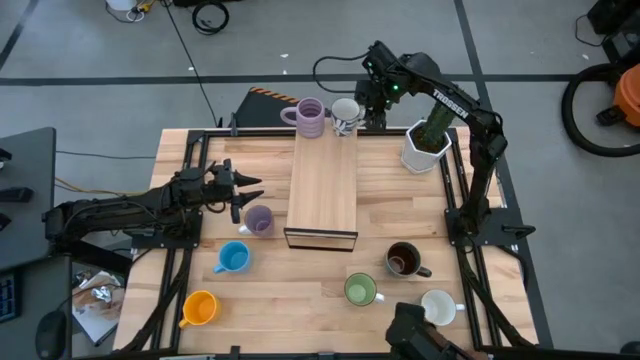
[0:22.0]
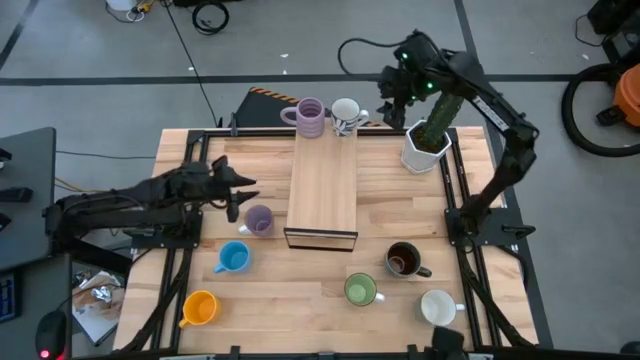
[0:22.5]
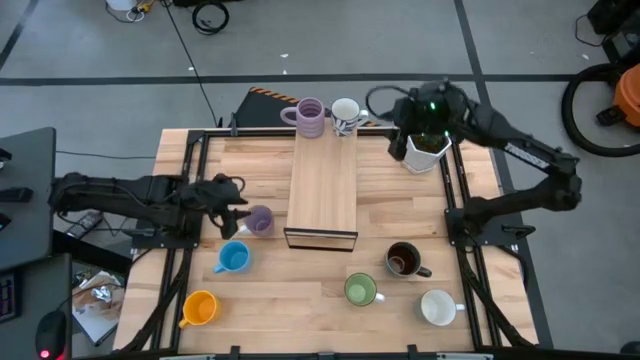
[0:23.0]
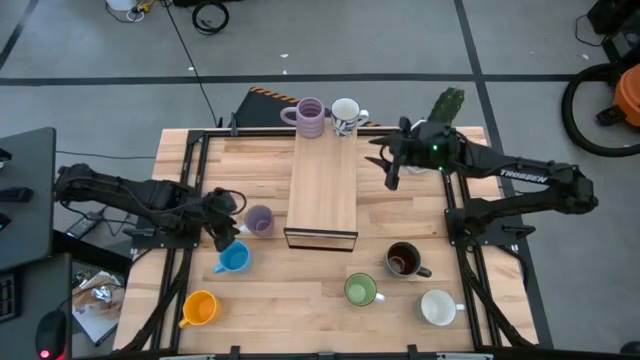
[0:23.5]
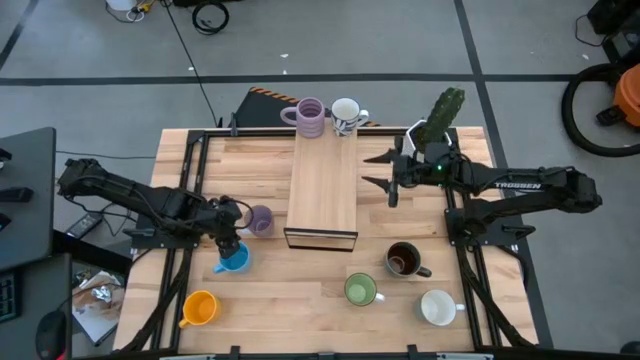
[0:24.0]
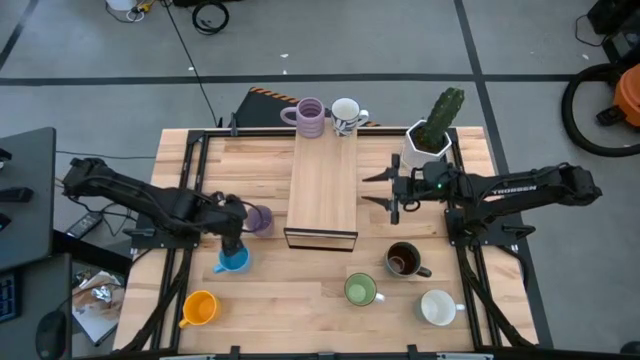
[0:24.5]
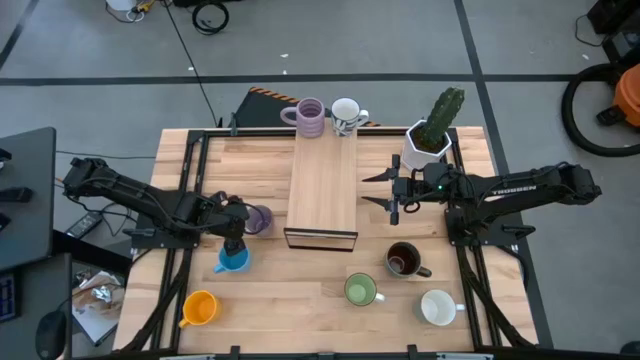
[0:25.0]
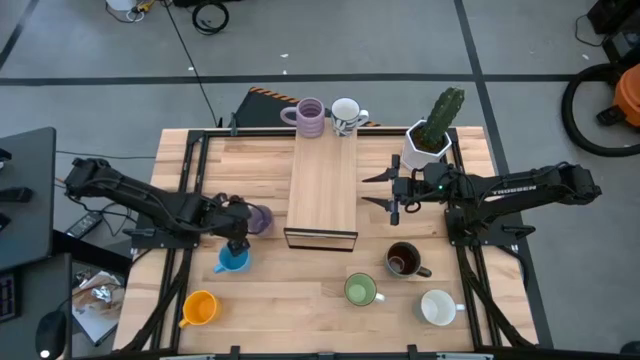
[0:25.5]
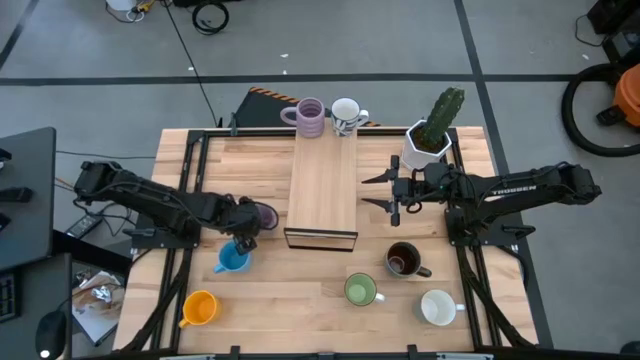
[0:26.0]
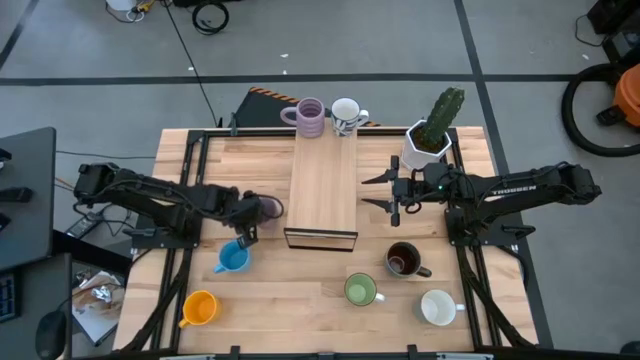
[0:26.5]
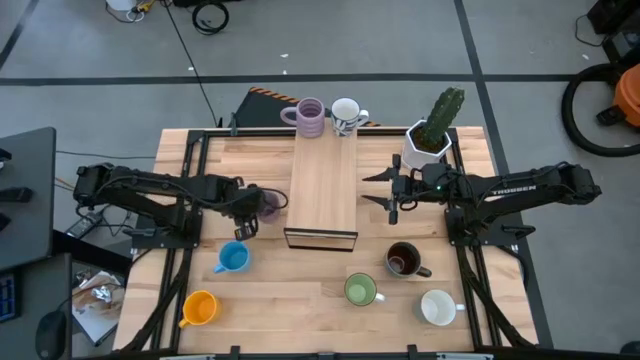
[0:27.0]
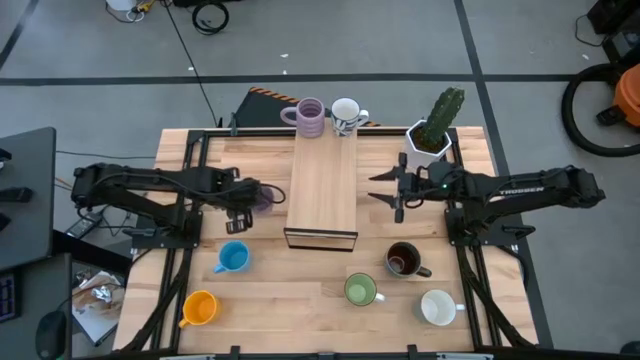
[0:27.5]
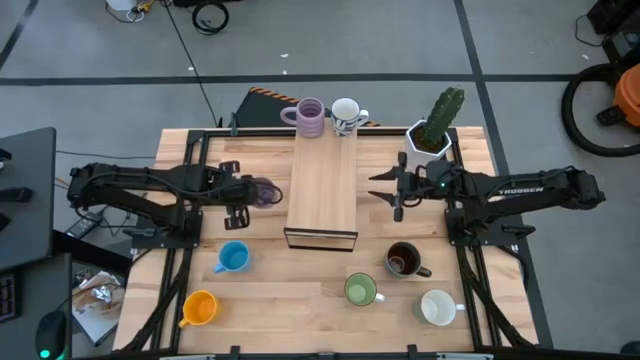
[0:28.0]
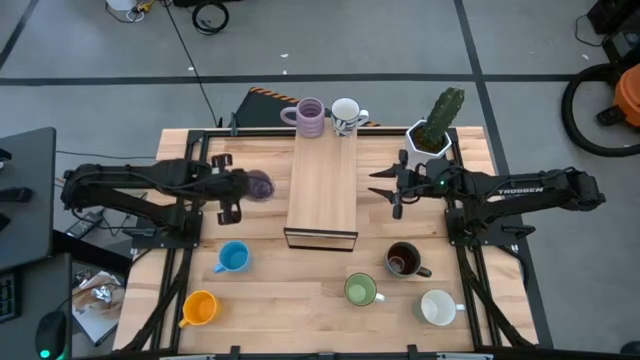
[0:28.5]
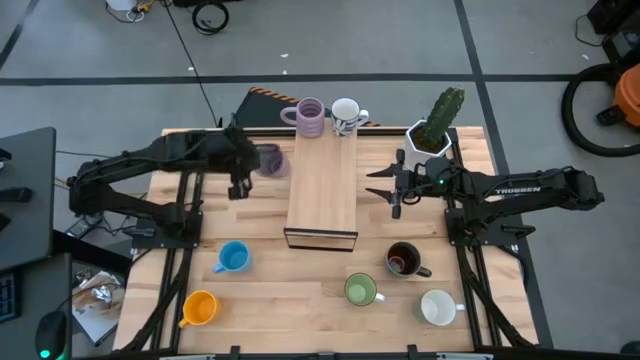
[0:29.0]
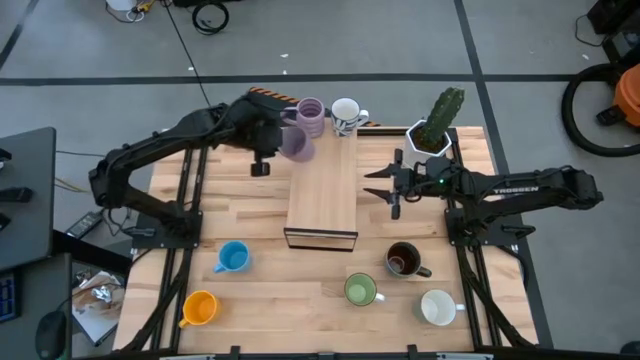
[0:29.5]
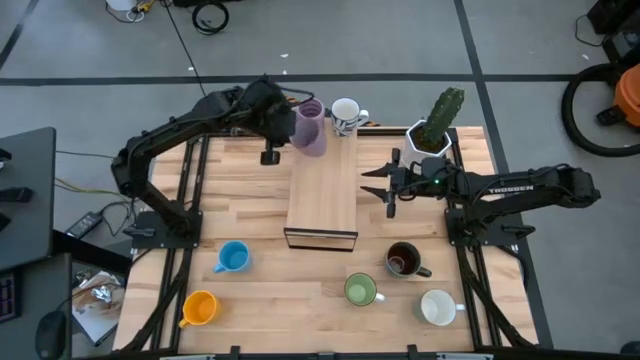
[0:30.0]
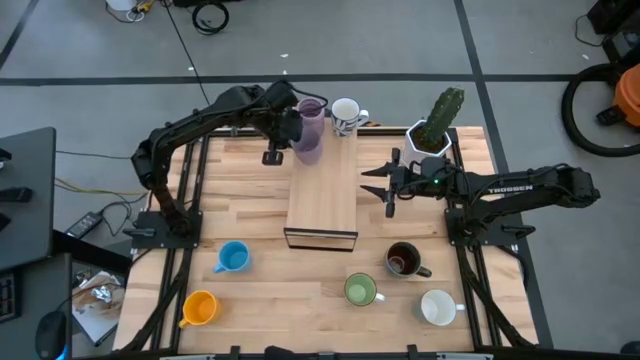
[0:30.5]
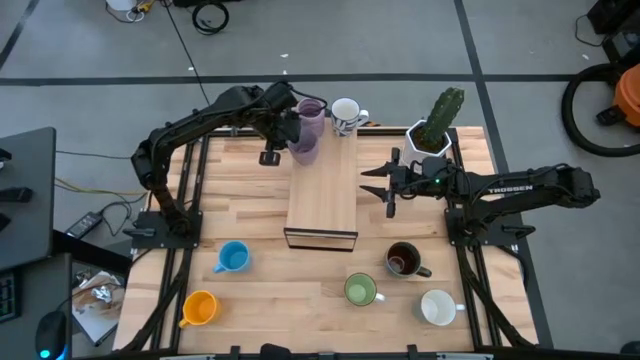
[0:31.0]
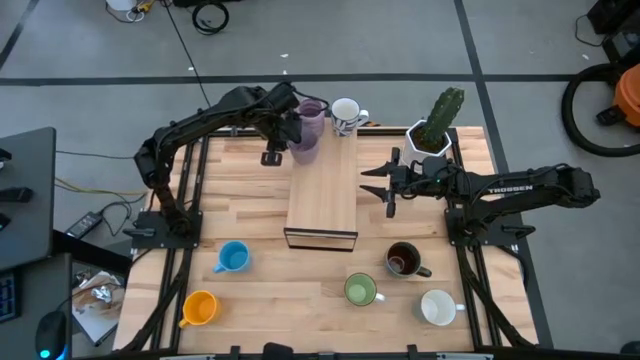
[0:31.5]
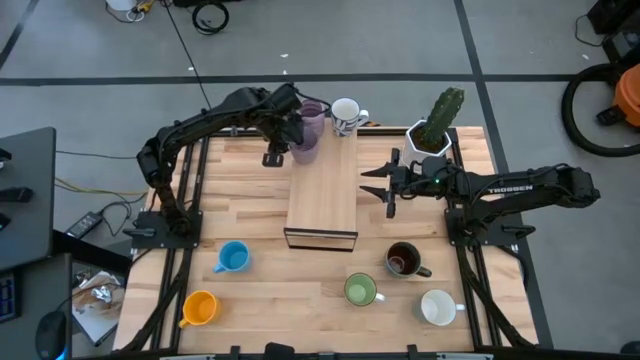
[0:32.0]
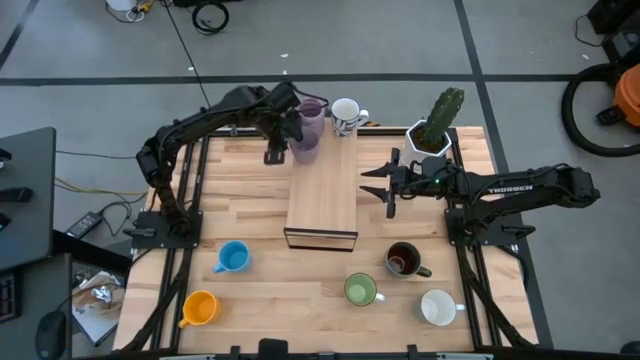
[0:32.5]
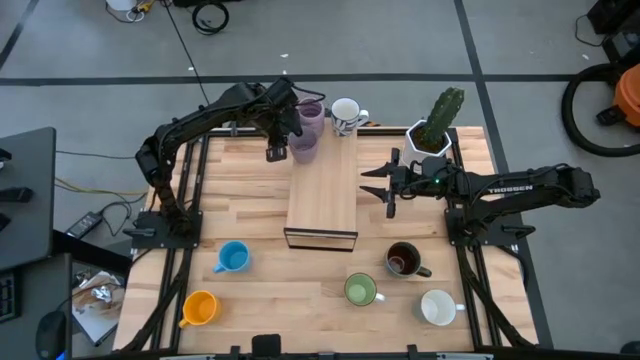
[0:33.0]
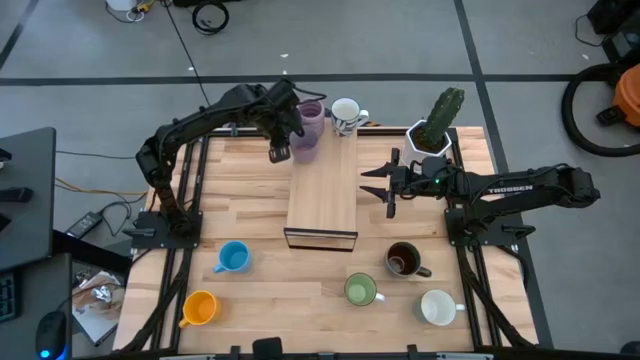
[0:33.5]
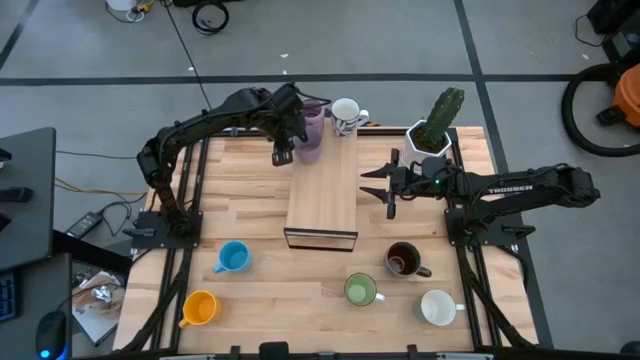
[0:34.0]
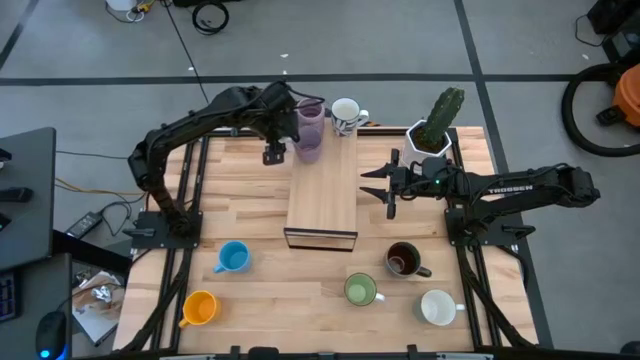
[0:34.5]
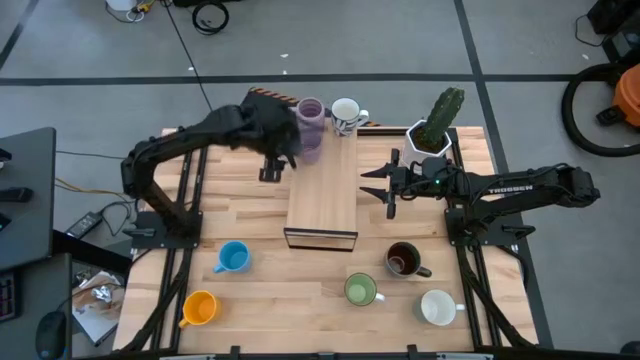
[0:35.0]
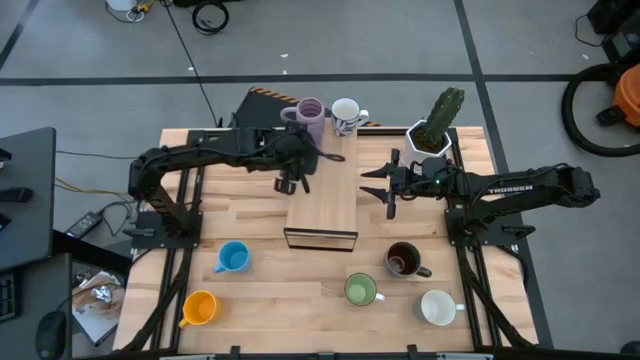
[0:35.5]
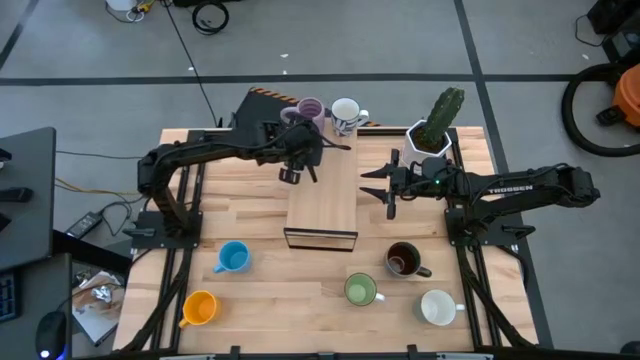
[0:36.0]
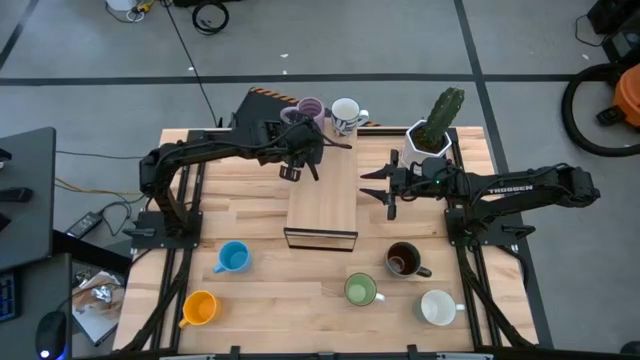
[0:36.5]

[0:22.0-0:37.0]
Task: Place coffee mugs
Put the purple mug on the shelf

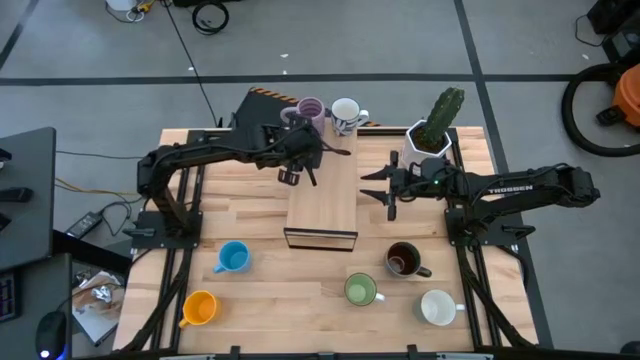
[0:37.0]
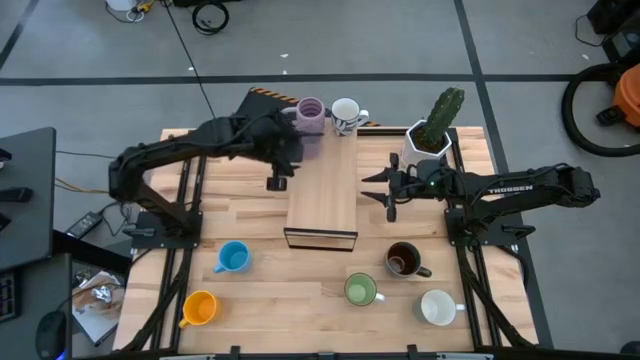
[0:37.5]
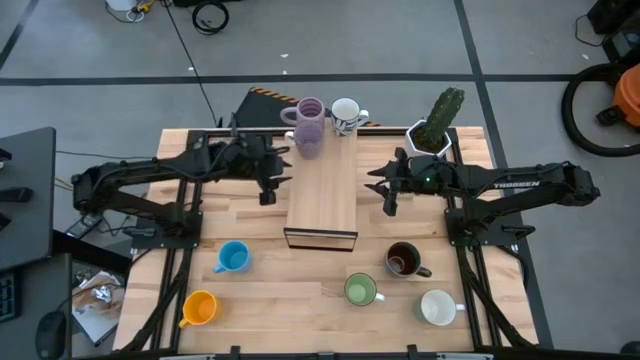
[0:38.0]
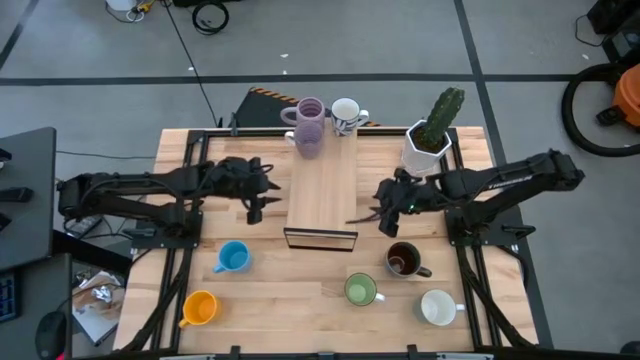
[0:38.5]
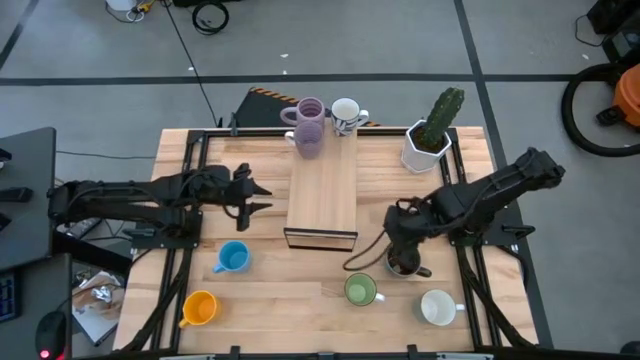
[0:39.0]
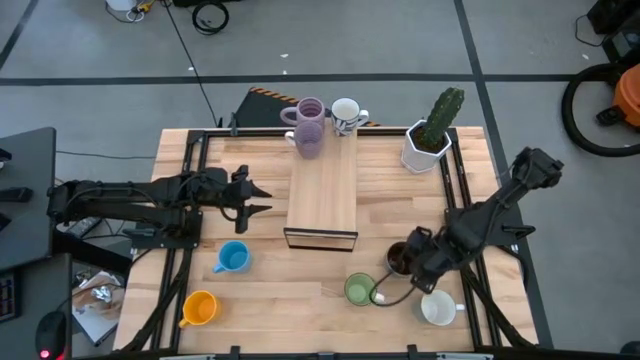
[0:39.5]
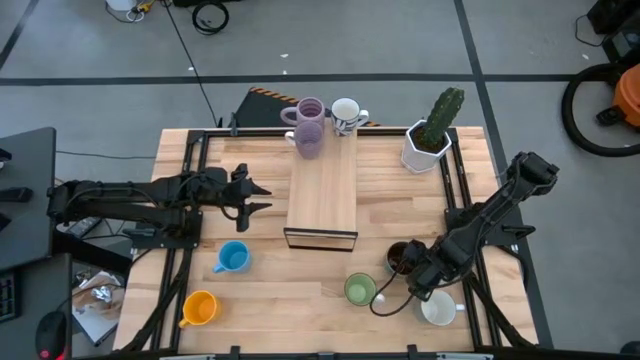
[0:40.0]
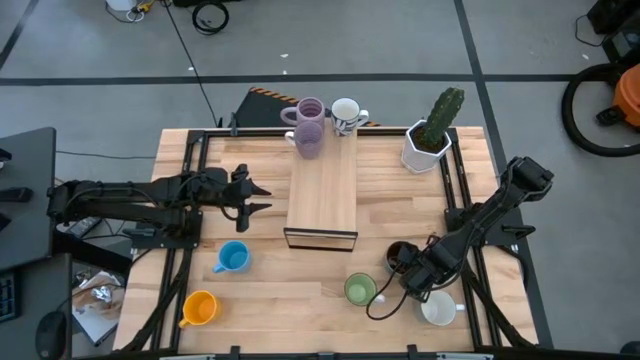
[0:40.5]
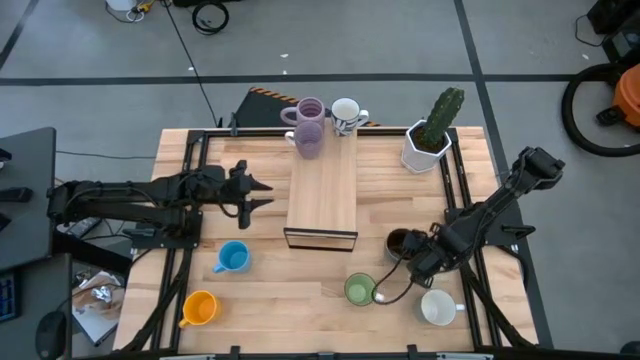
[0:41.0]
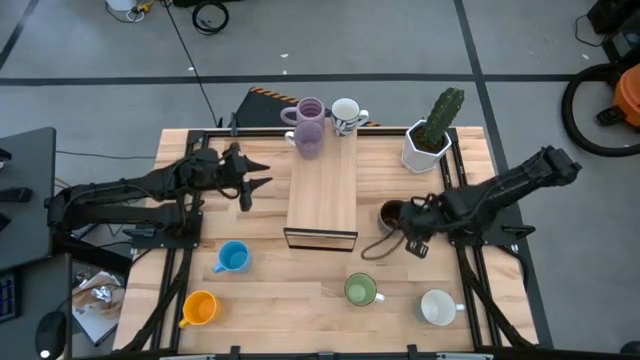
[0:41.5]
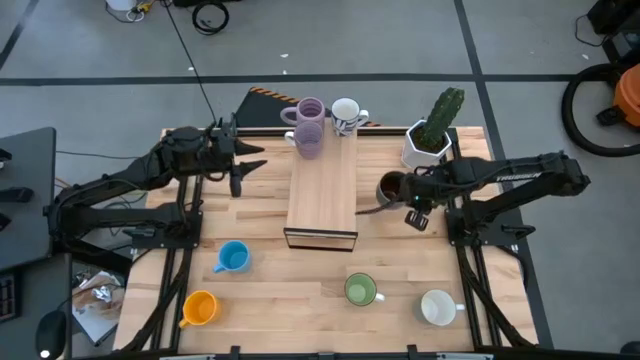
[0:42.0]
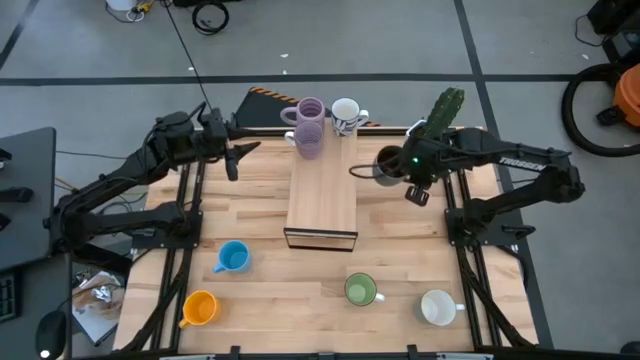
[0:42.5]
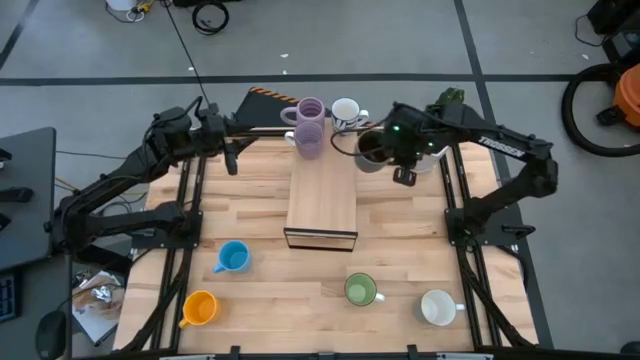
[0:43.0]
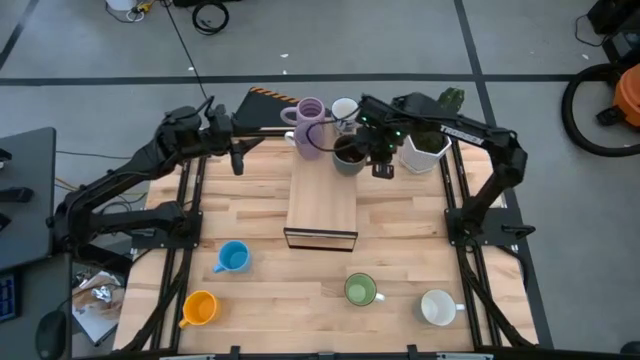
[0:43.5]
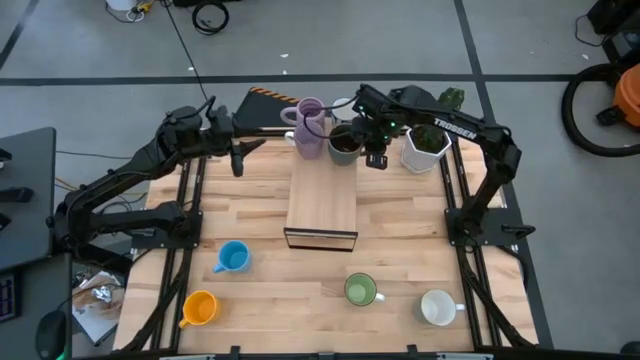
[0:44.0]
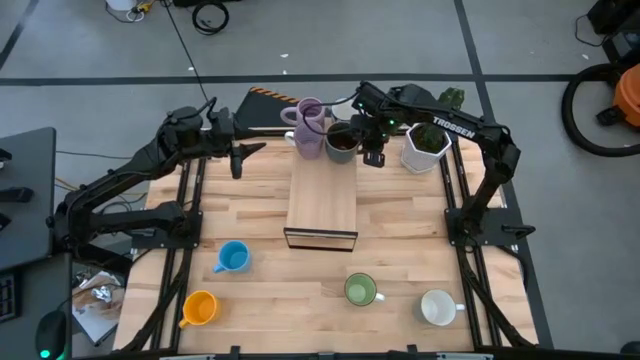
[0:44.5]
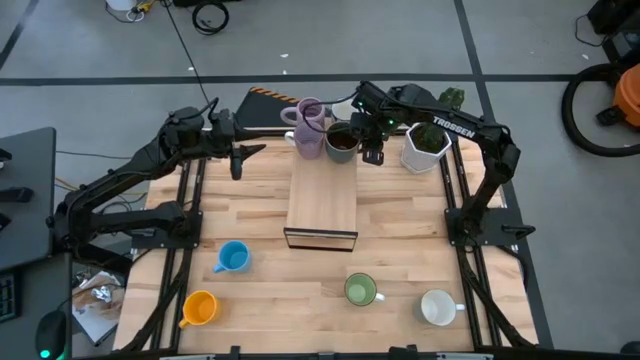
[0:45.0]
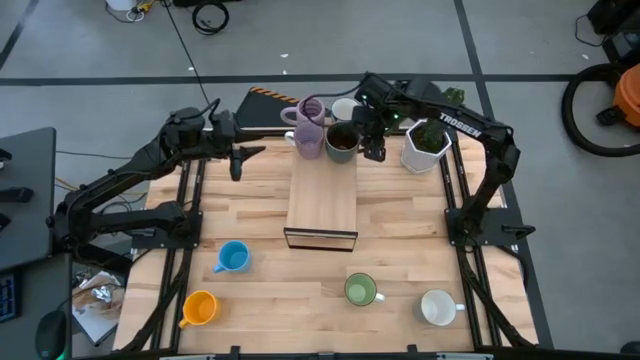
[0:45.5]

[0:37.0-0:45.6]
Put the blue patterned mug on the shelf
